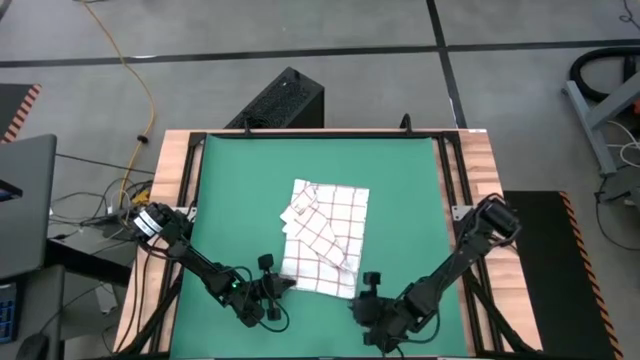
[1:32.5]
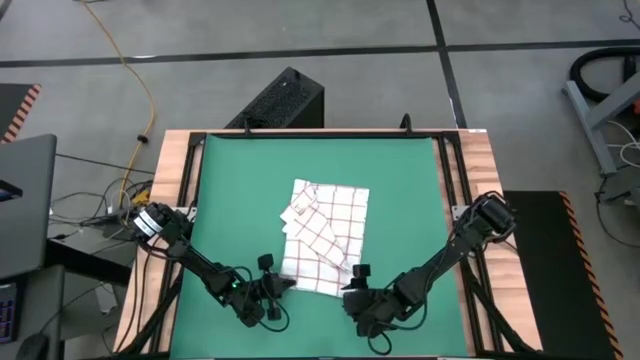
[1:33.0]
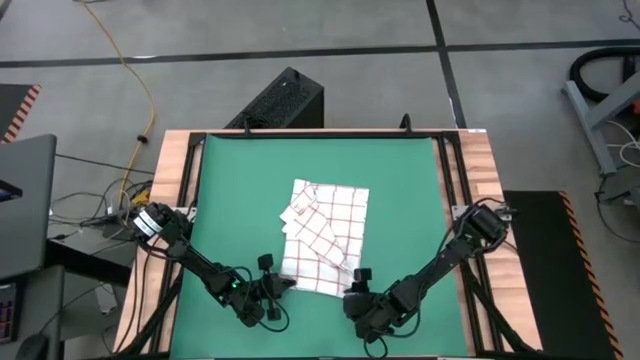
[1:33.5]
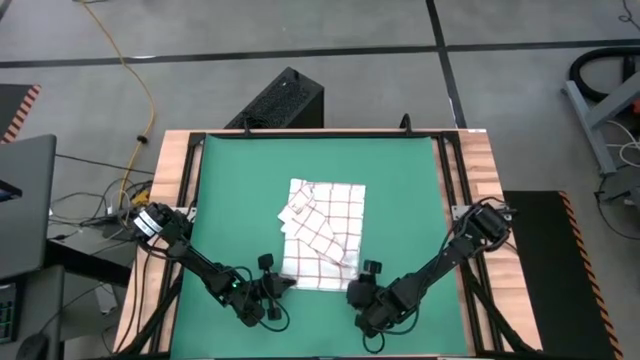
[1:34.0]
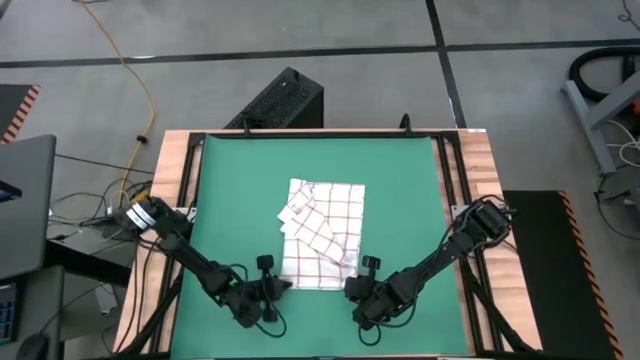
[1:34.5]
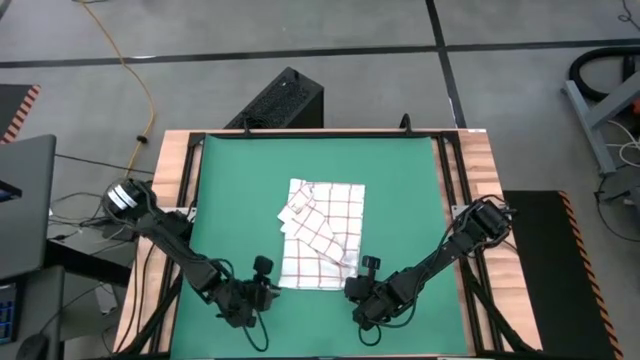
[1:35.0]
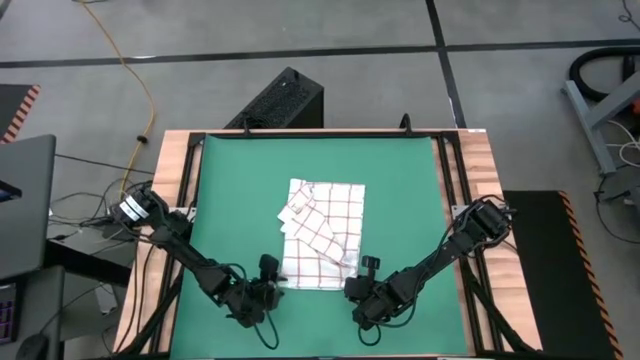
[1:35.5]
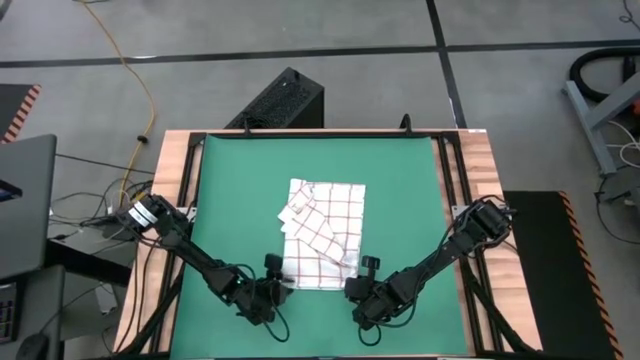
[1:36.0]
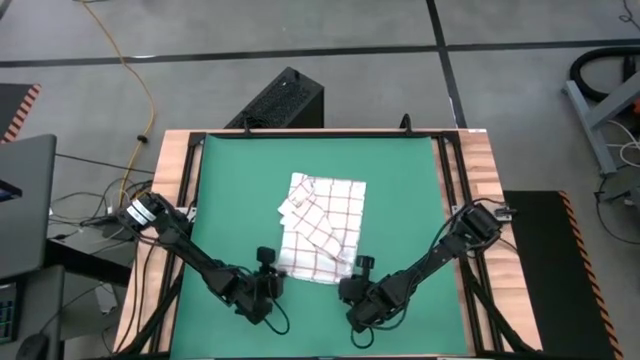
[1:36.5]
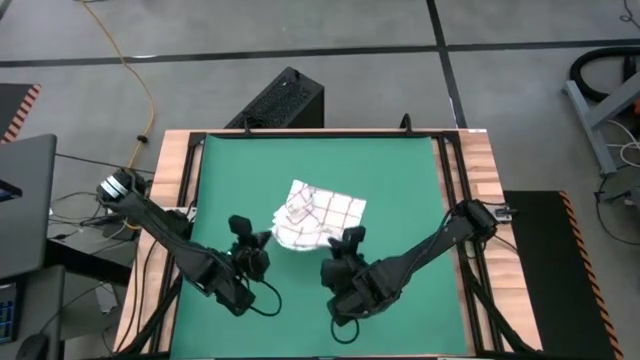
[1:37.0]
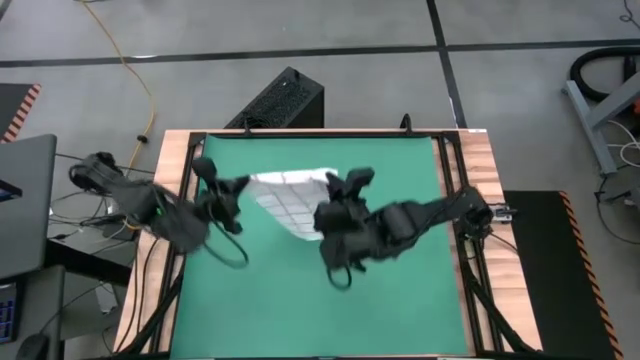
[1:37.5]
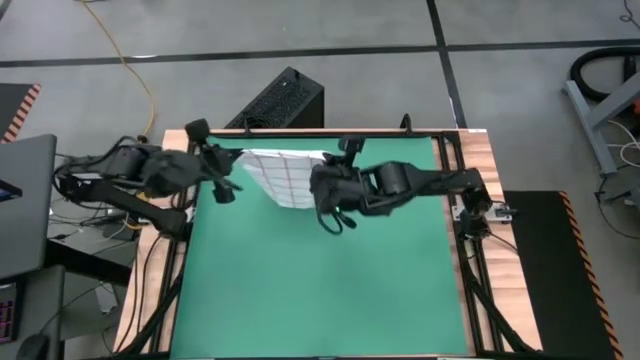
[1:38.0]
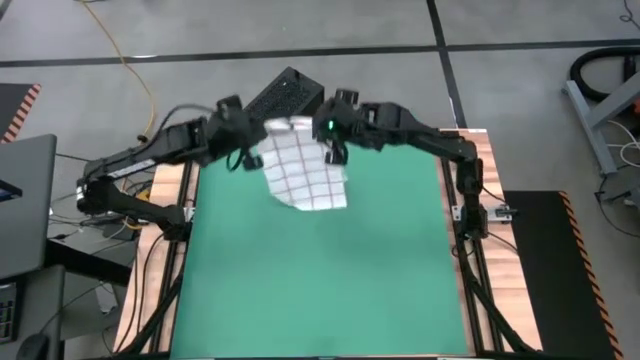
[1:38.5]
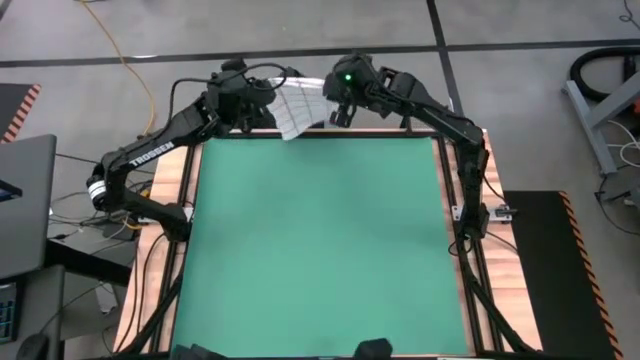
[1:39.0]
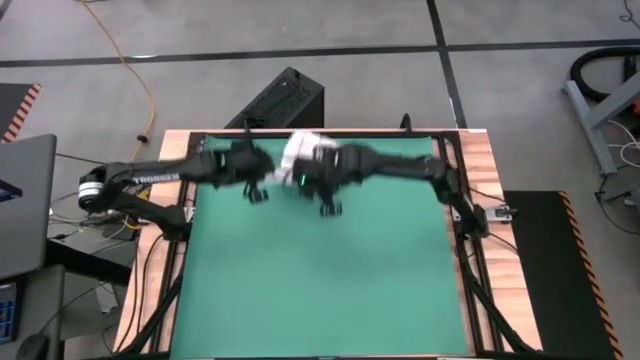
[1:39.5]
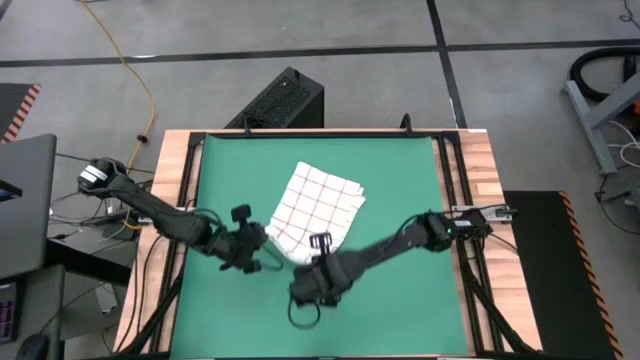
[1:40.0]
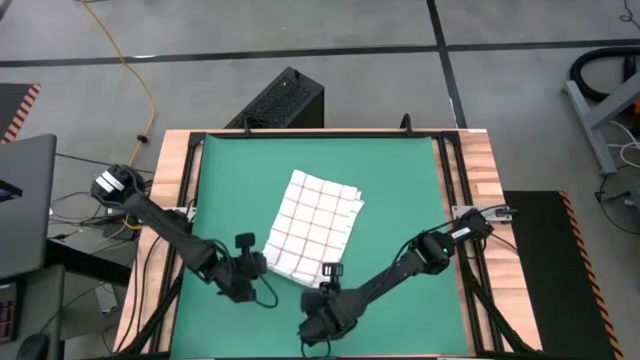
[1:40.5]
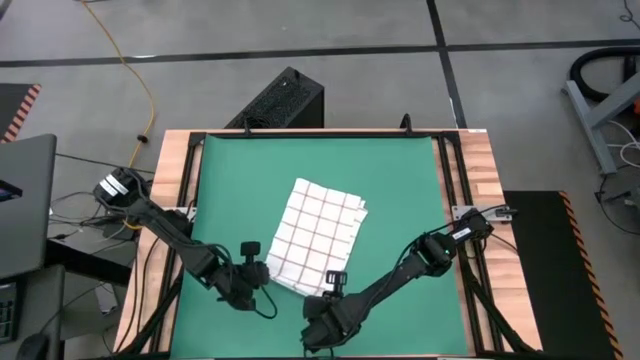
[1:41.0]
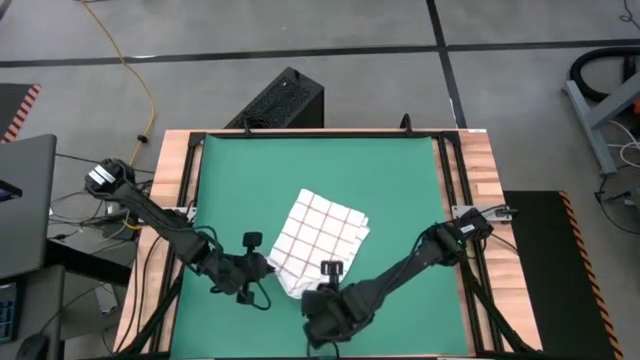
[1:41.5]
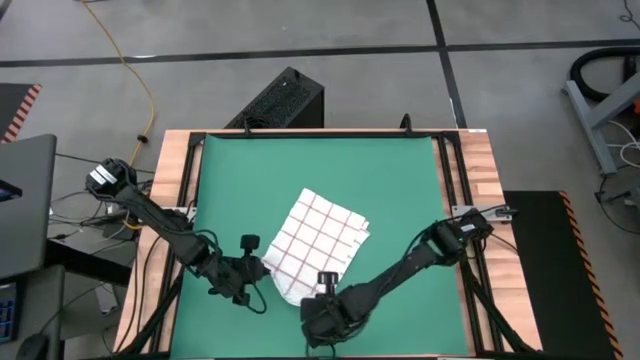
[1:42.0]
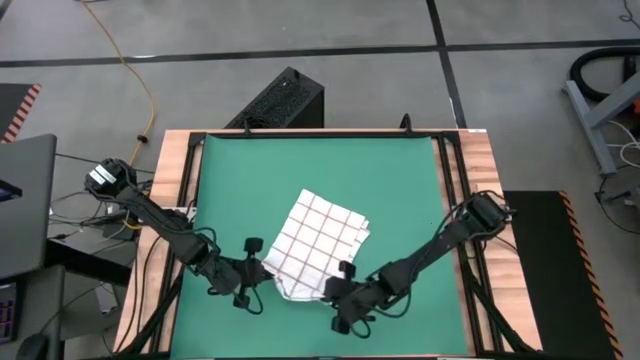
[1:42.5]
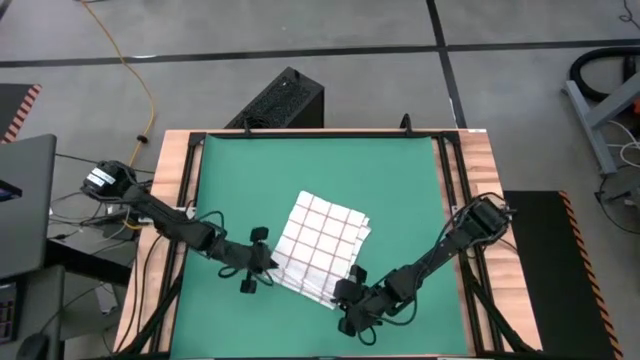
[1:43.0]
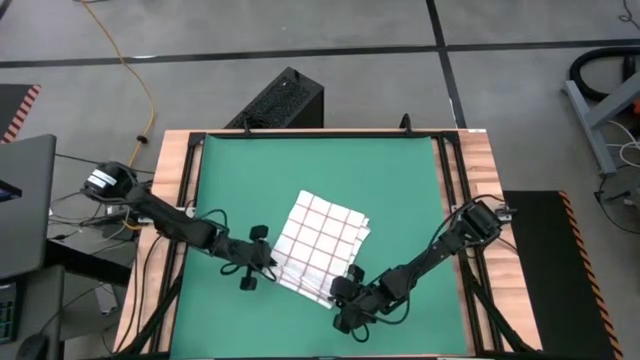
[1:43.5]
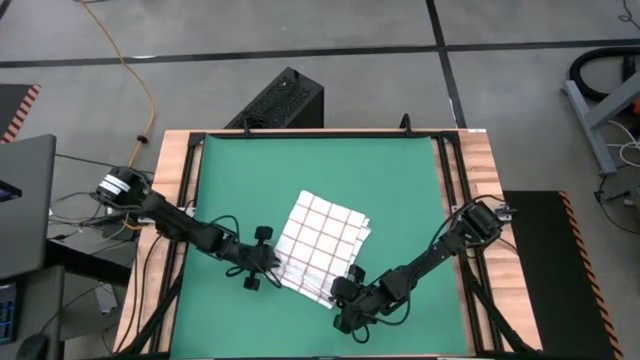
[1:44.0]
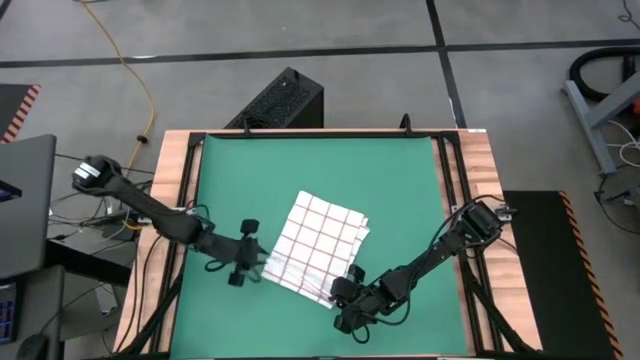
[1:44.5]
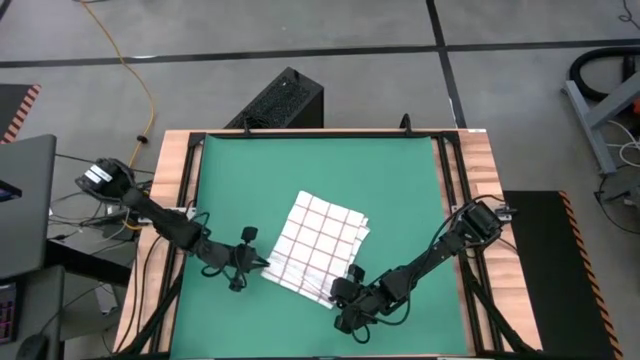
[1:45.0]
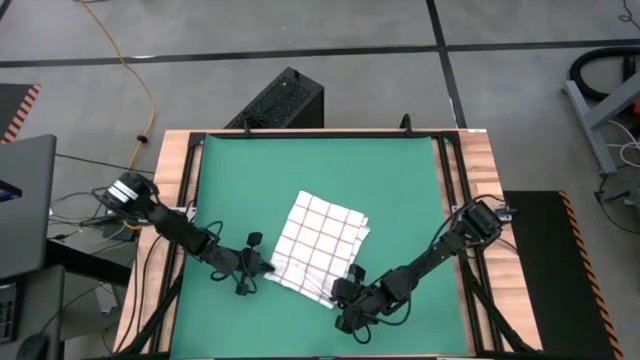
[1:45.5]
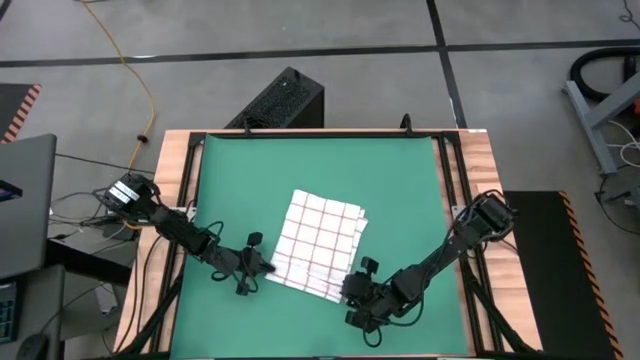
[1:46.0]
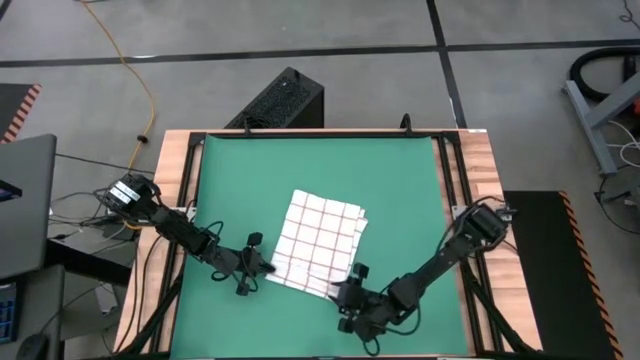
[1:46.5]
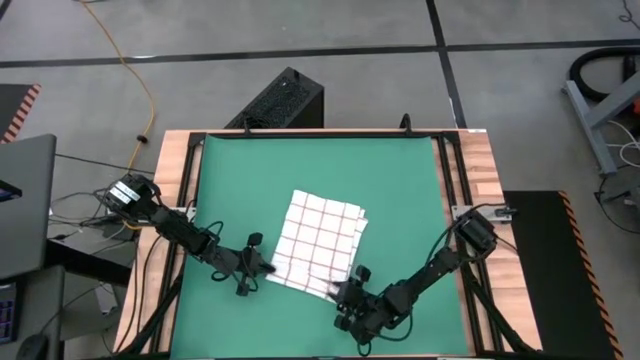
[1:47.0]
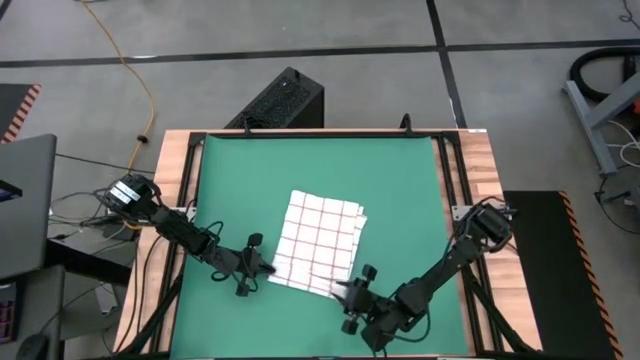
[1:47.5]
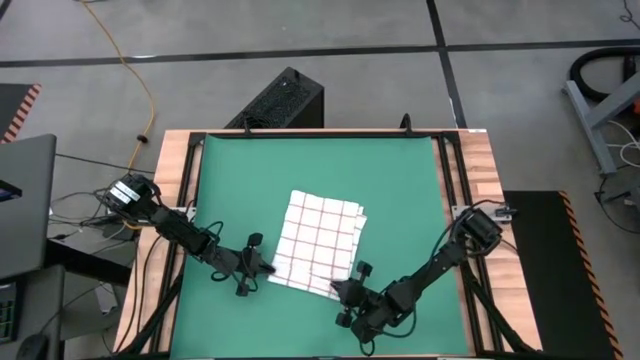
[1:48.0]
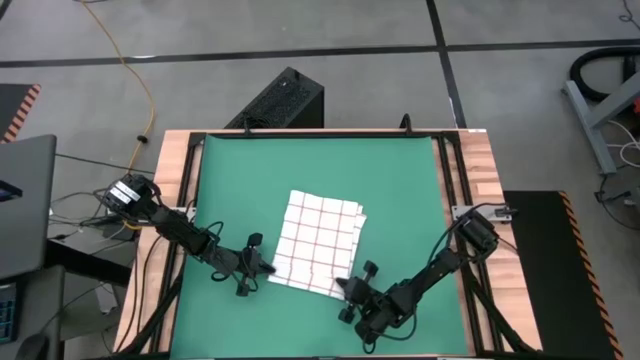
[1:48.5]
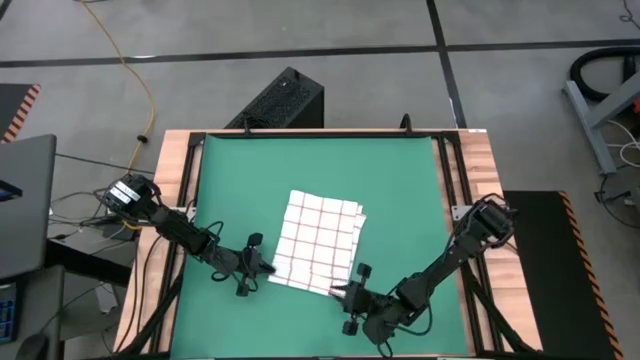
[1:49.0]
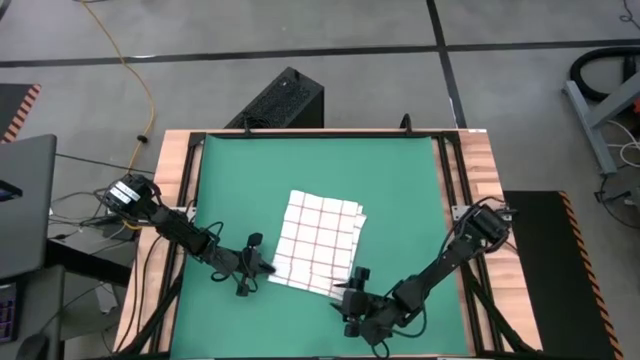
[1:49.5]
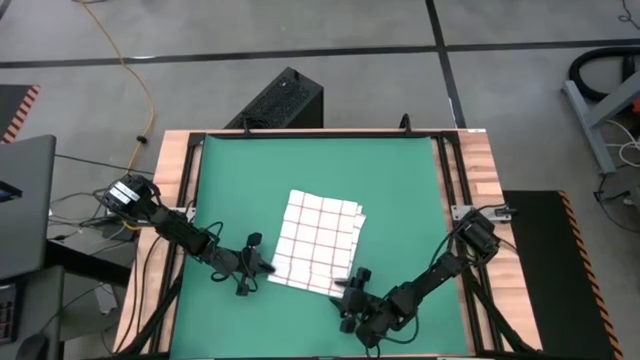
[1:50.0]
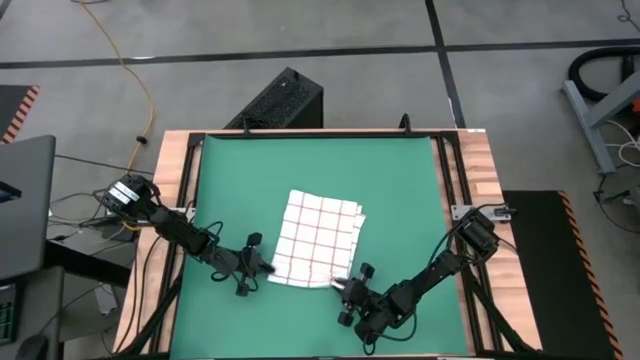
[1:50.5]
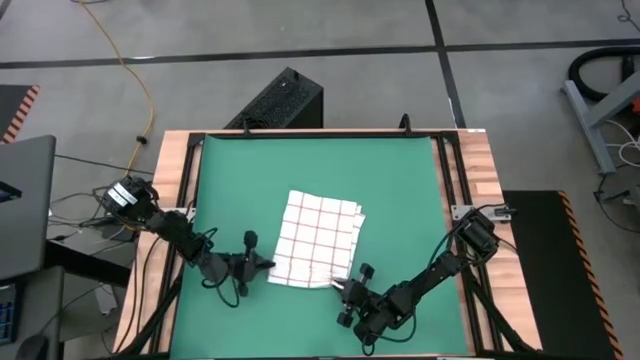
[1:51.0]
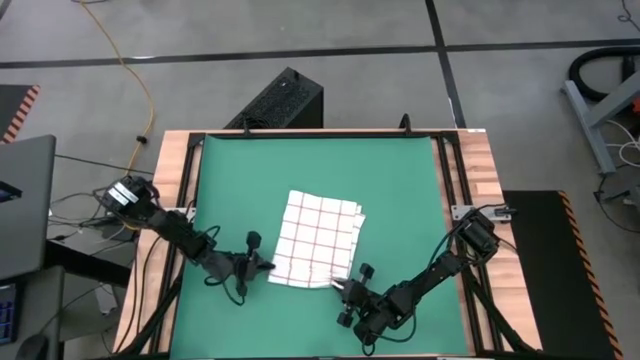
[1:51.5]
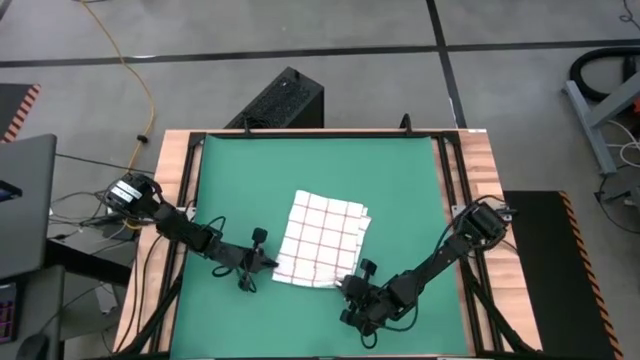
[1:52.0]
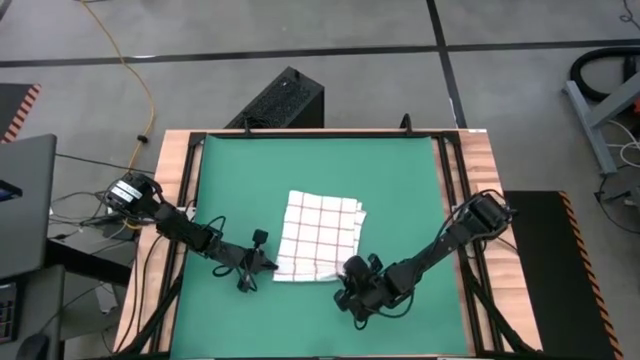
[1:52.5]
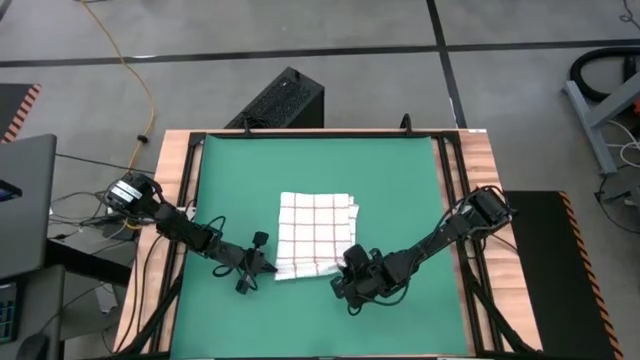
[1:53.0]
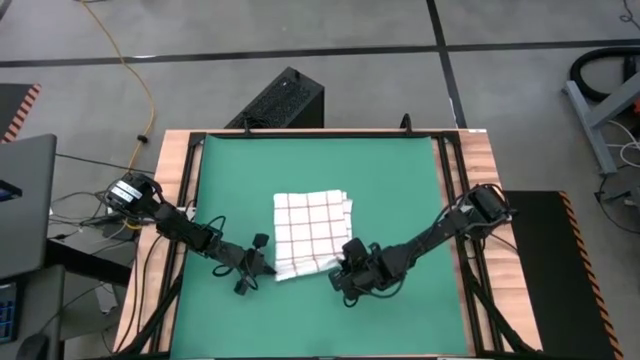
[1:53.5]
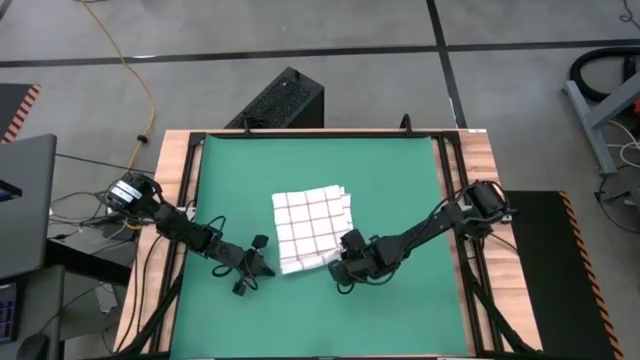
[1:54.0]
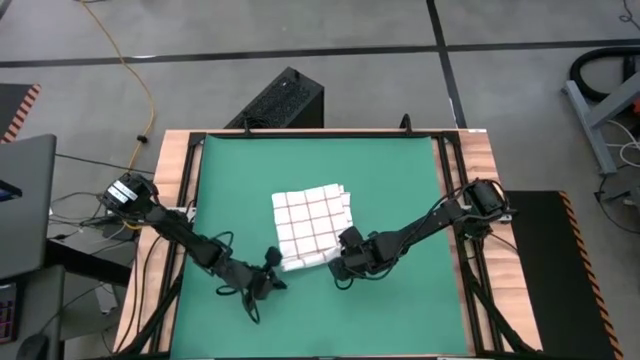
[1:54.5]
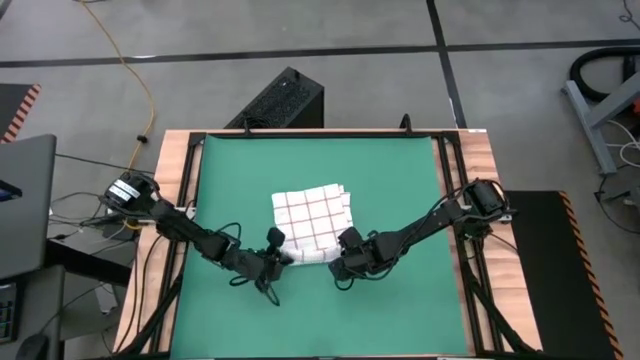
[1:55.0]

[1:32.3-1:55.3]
Task: Roll towel into tight, uniform cylinder
Roll the white towel
